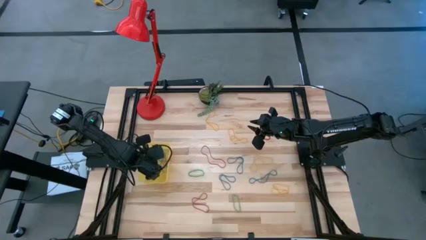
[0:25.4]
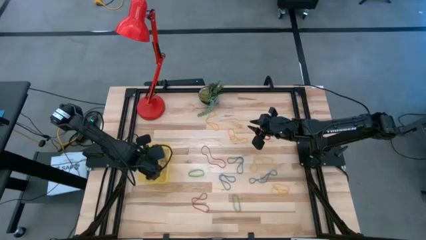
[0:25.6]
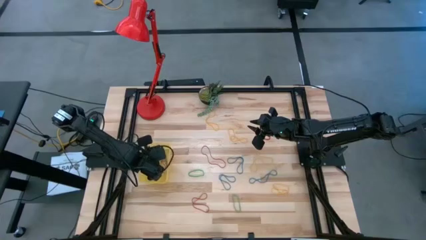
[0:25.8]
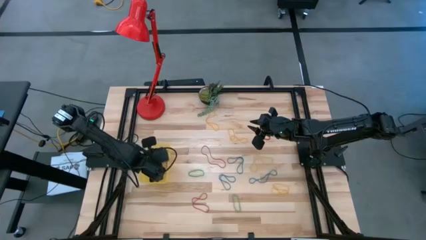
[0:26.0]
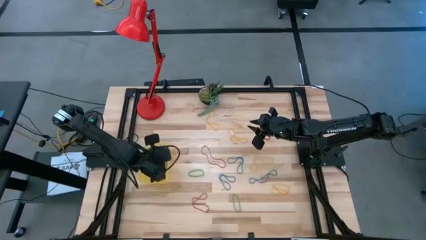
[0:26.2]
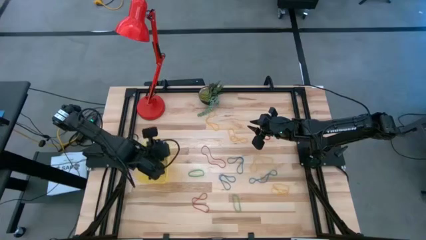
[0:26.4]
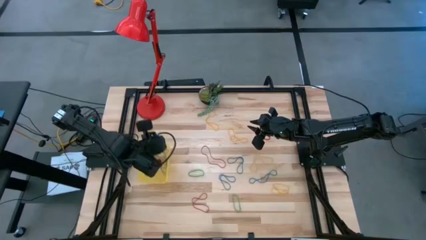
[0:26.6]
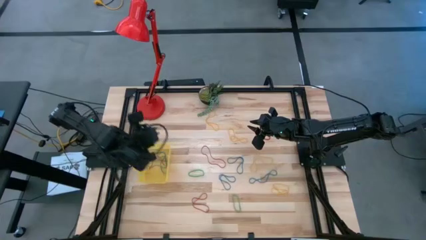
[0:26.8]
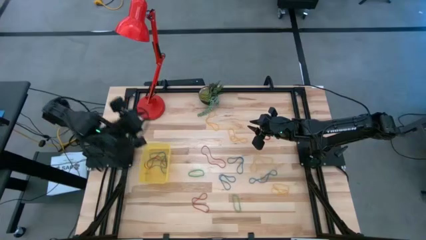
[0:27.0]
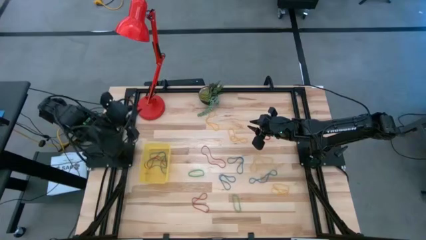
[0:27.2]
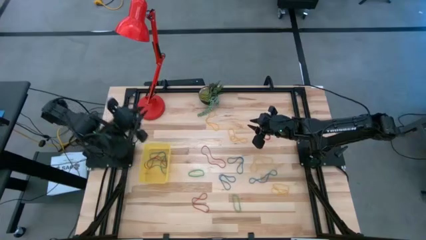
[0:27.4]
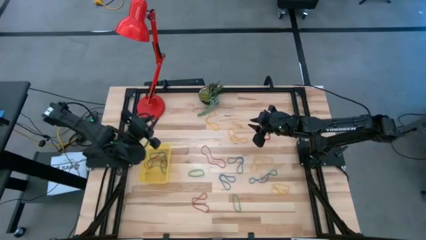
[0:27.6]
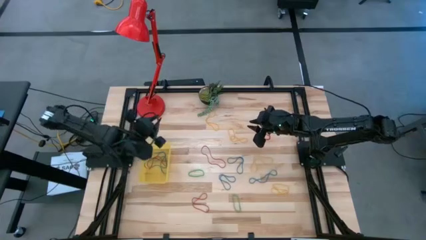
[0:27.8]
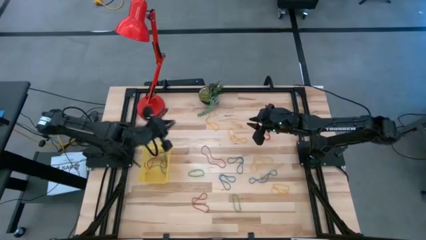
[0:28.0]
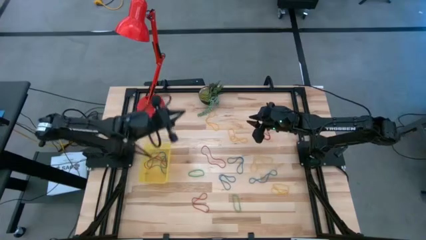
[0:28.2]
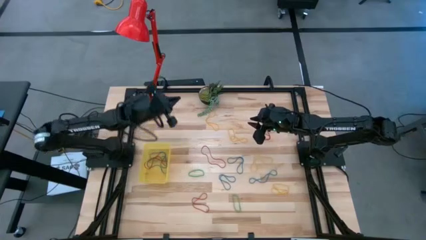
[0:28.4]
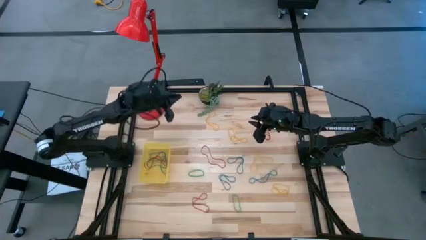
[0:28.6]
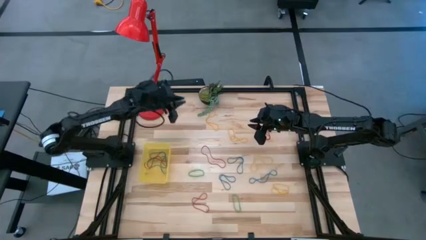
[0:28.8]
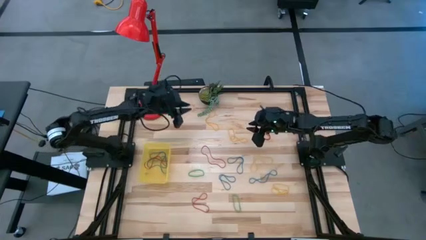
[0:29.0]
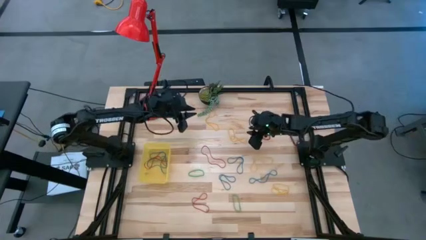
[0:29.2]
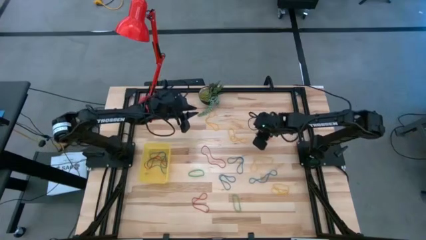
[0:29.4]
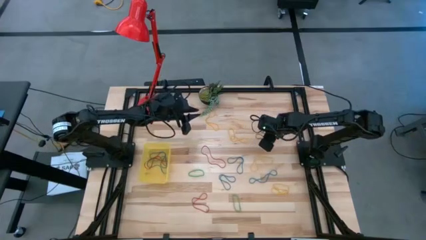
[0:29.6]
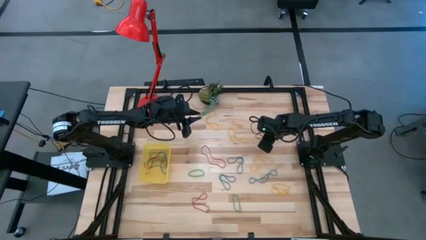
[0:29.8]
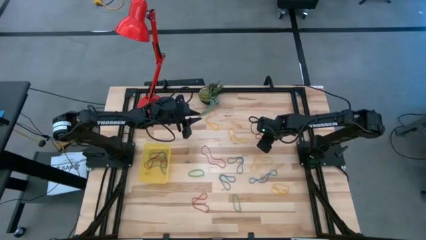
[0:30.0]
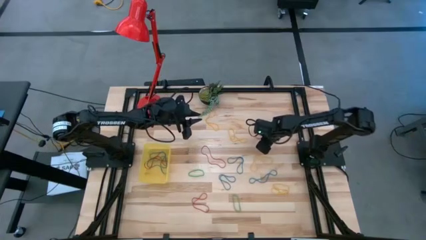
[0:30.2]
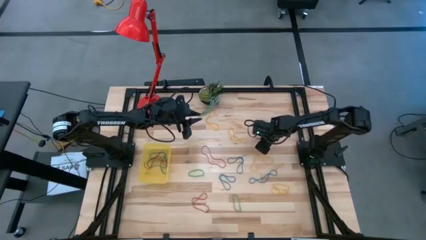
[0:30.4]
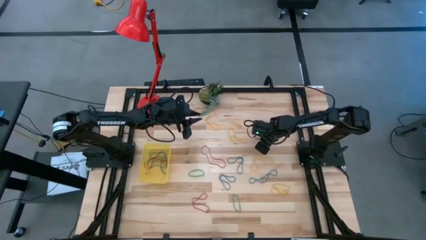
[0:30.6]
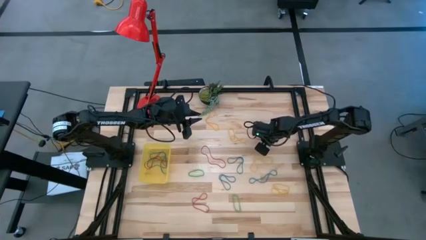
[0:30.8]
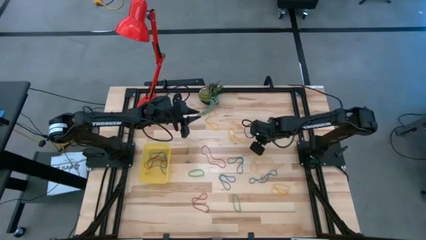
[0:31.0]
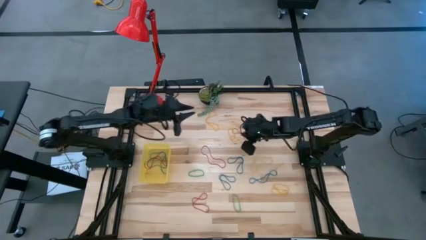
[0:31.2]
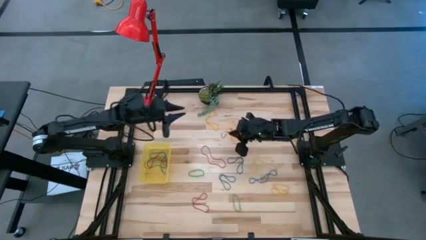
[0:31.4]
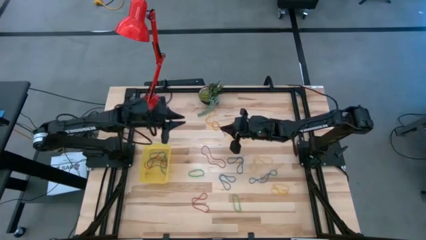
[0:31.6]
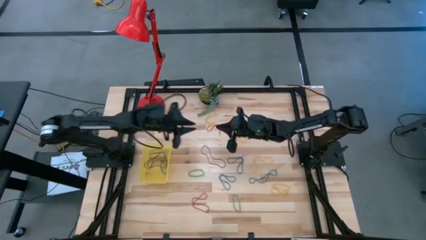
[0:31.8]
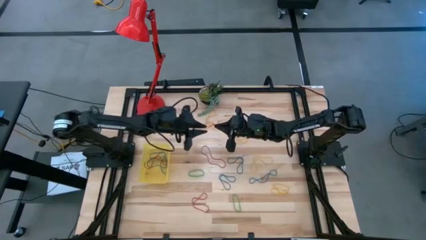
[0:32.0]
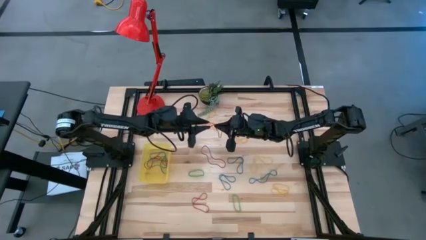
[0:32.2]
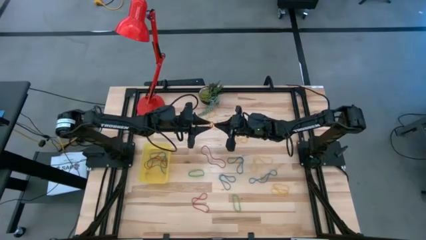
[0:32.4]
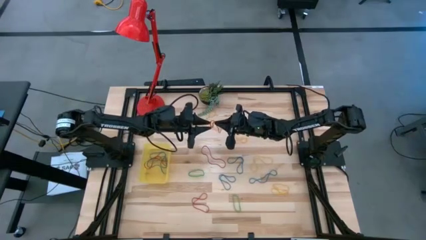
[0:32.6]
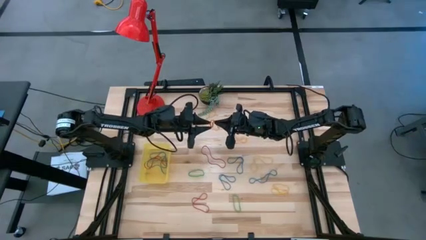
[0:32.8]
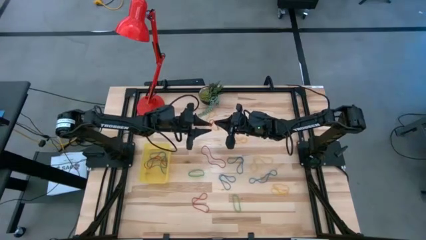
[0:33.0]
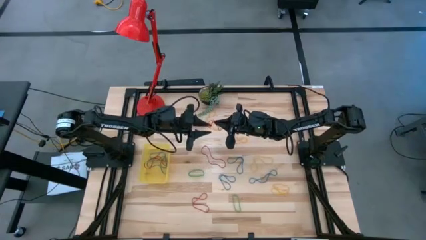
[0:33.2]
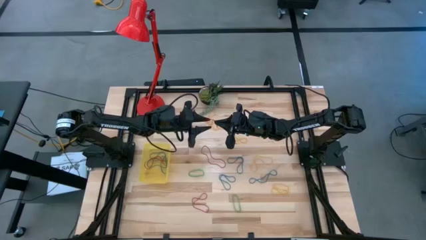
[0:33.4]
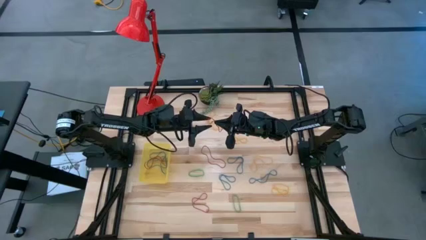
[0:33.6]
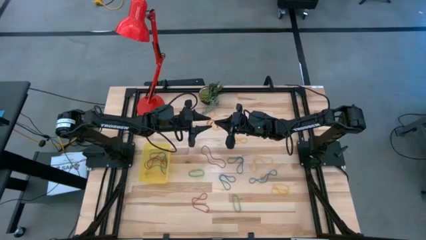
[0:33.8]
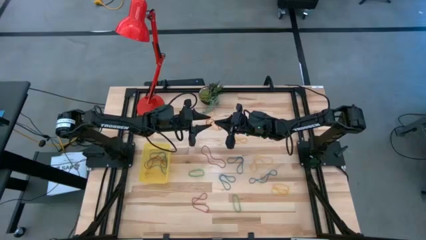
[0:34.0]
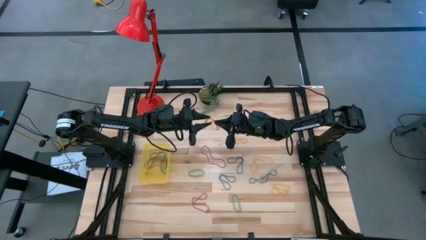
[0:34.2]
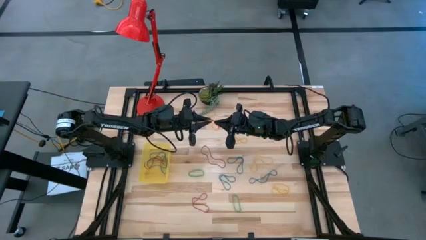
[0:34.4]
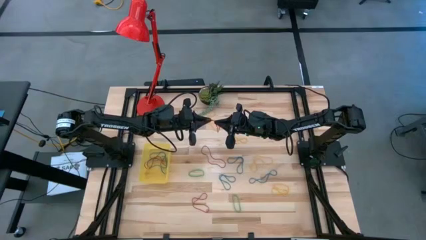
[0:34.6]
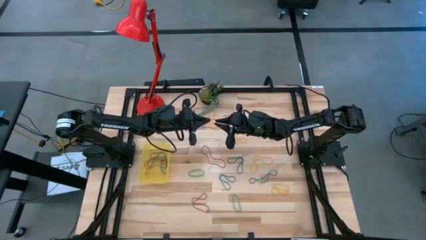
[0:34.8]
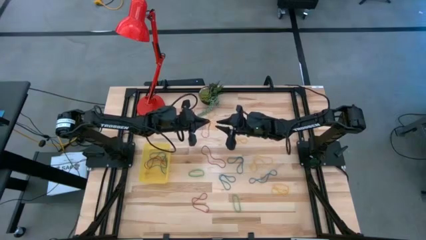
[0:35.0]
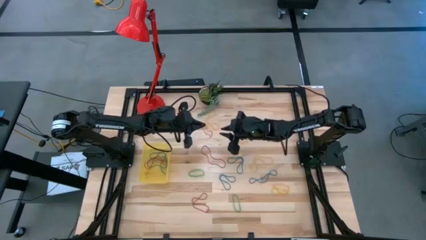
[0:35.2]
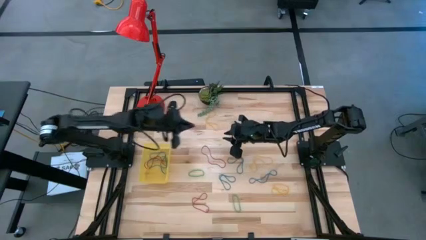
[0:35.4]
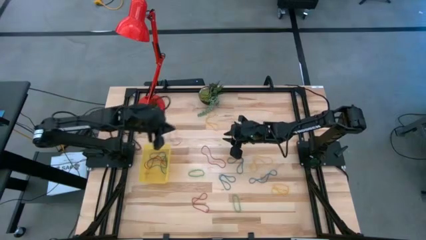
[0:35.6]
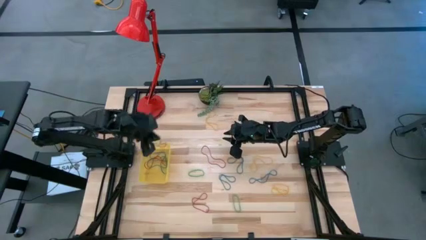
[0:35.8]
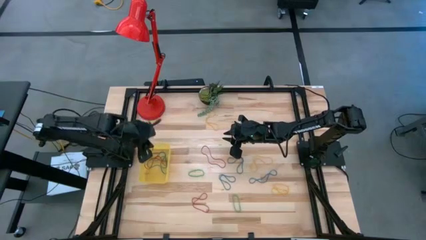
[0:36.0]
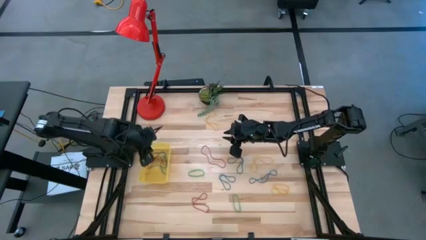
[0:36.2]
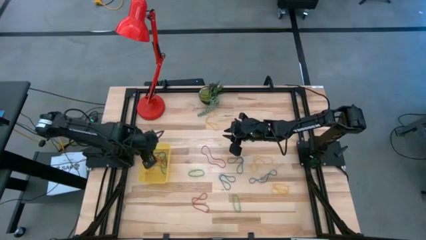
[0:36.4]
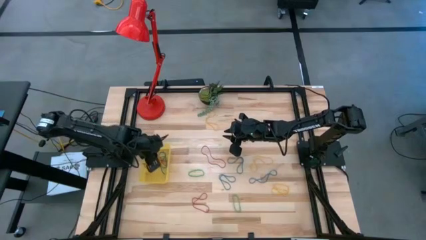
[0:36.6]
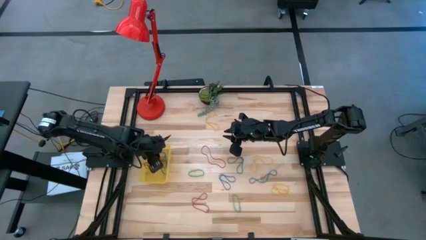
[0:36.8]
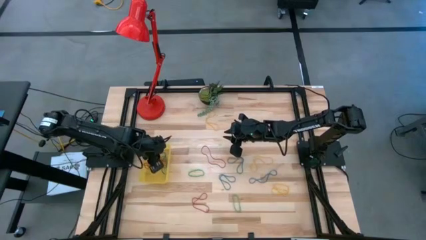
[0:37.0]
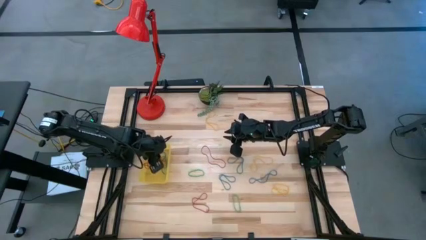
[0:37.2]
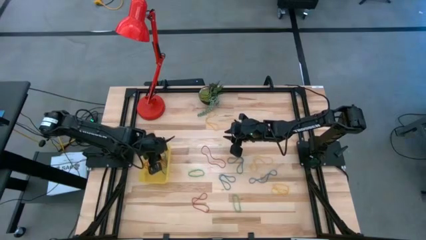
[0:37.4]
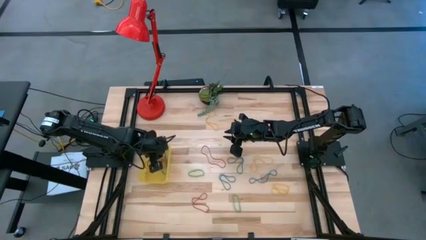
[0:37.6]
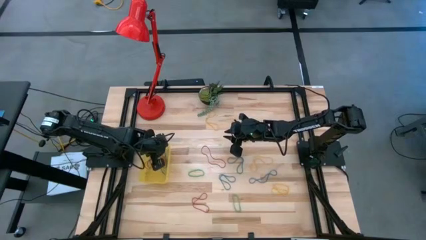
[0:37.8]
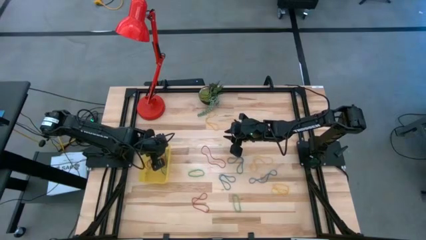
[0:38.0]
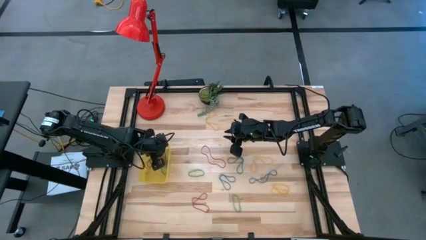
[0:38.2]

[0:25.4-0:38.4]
Task: Pick and place items into bin
Put the red rubberbands into the yellow bin

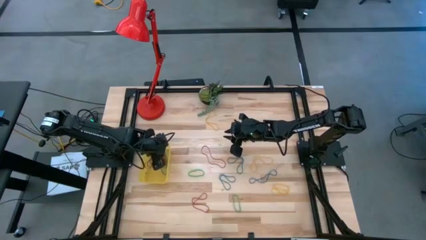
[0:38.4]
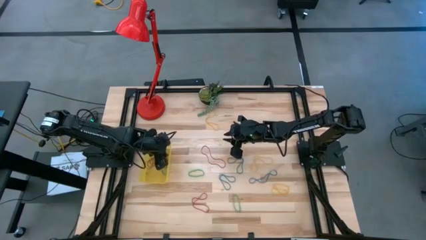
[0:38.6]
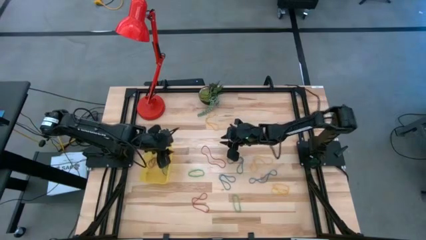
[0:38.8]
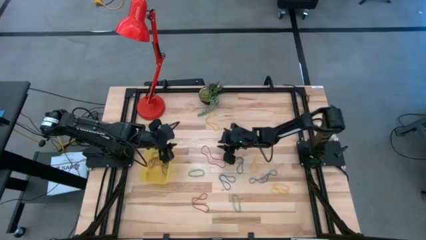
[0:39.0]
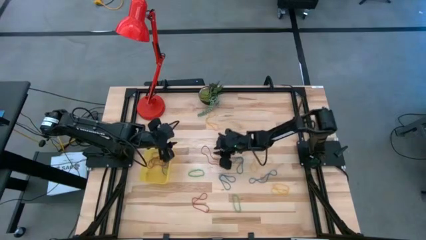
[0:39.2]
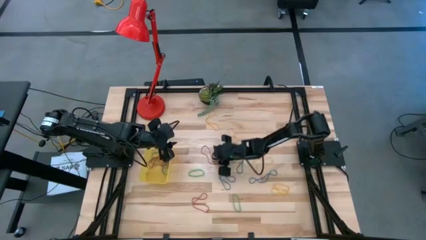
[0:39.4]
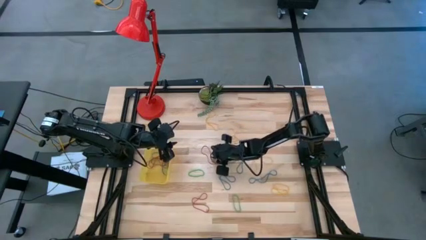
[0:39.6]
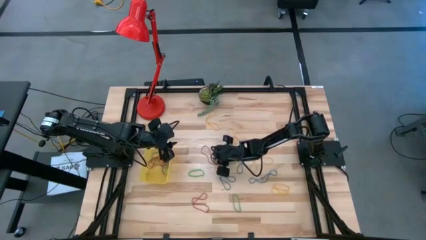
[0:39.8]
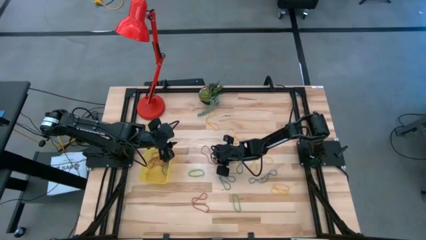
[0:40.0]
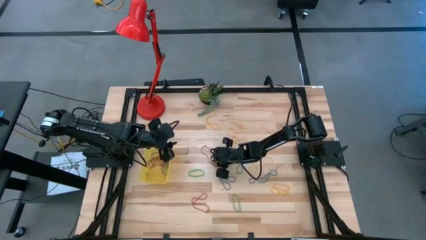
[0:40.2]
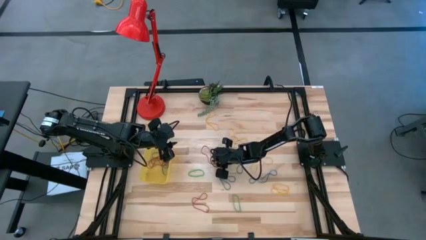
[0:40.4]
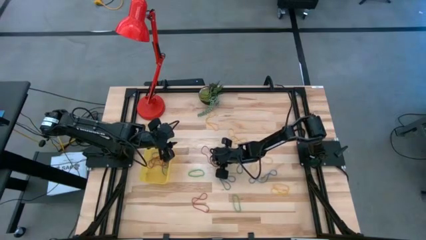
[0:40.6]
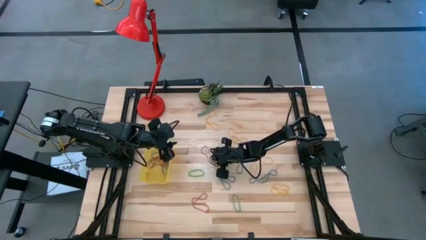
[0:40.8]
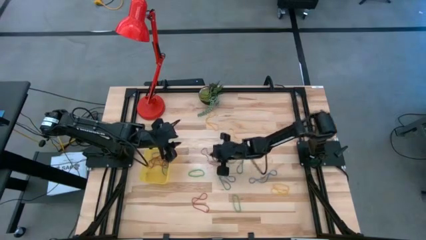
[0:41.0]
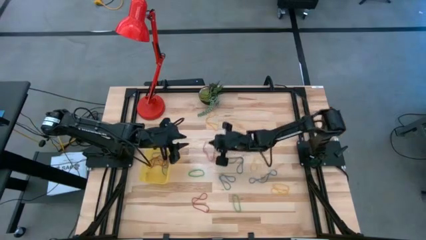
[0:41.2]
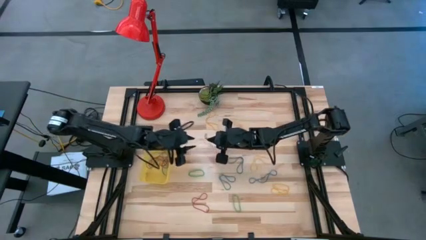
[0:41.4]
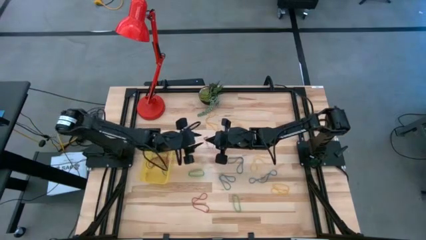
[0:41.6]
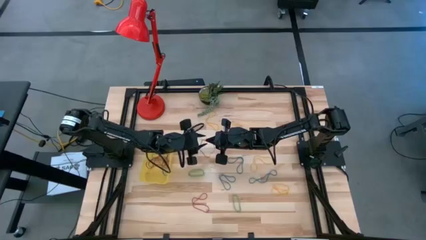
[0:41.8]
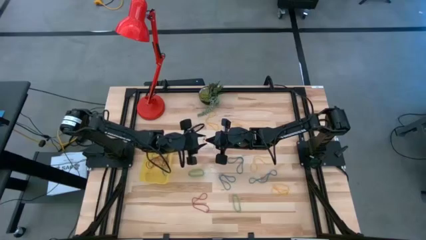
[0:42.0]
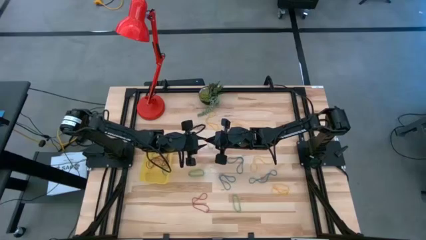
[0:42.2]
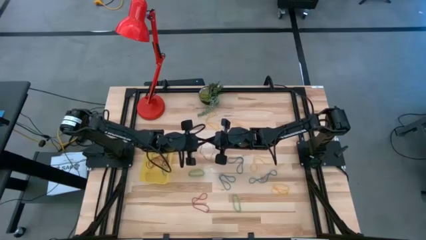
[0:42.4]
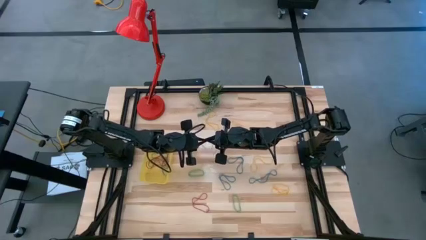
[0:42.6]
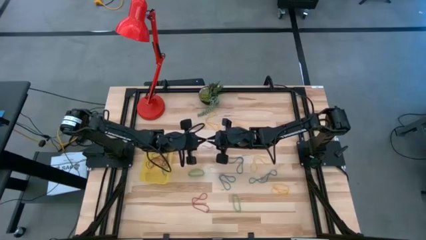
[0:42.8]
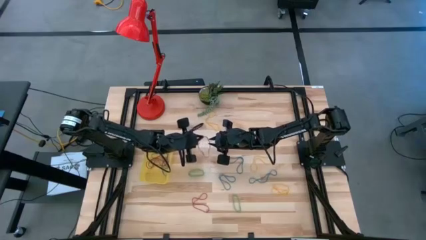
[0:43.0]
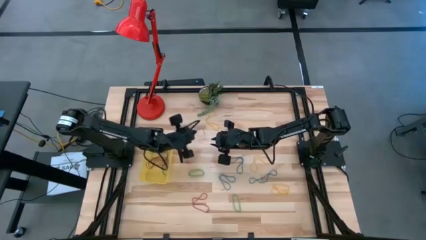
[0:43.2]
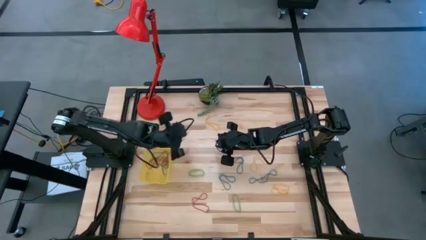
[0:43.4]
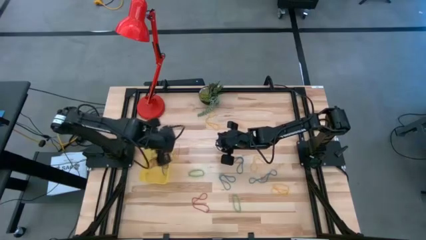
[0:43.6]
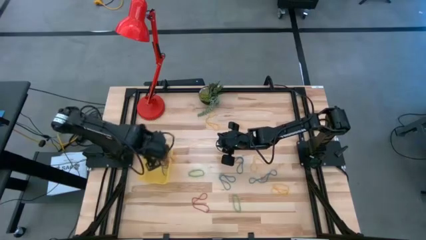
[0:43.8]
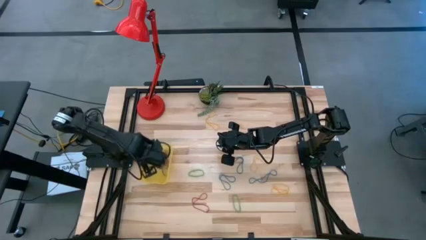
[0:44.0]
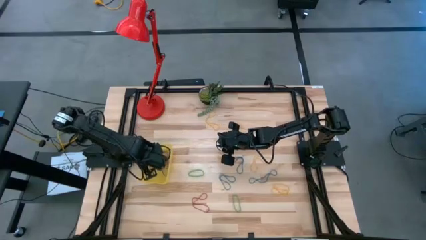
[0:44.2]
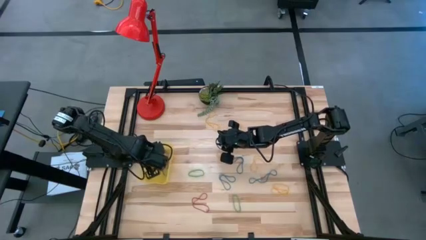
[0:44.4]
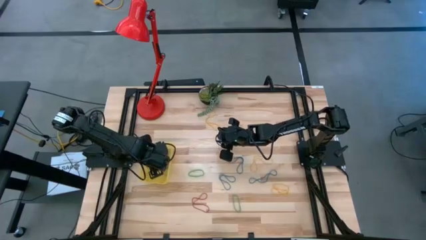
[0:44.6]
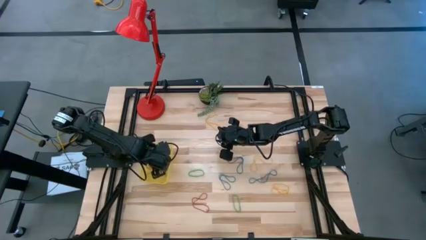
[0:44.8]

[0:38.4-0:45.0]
Put the red rubber band into the yellow bin
